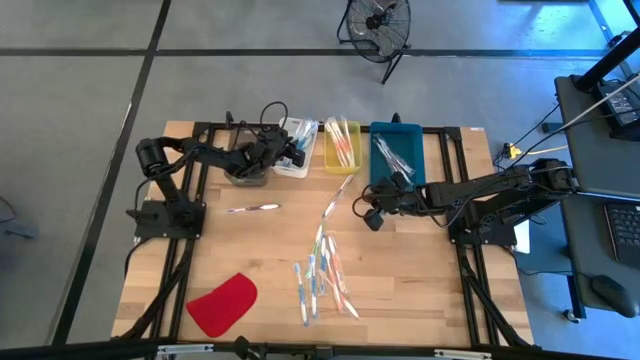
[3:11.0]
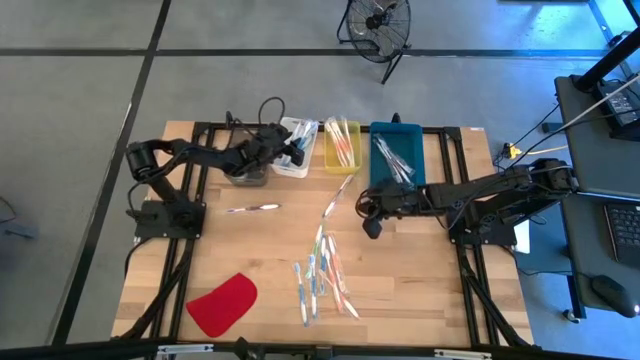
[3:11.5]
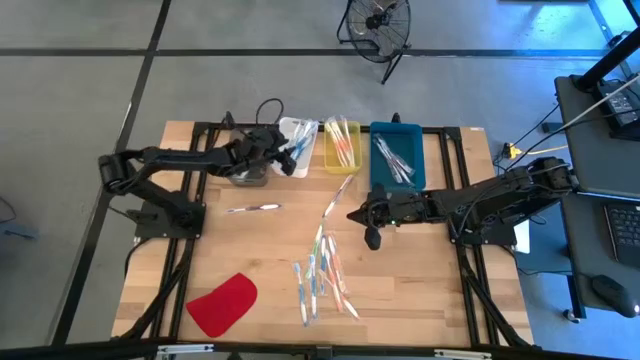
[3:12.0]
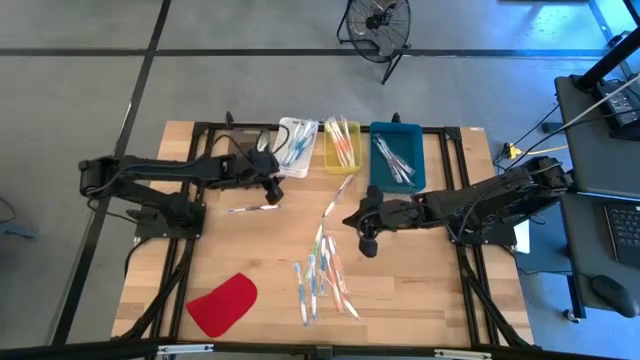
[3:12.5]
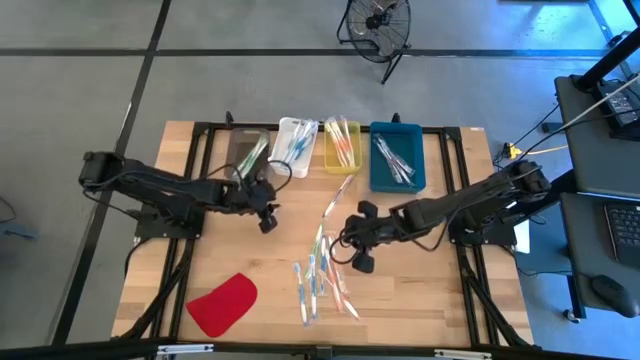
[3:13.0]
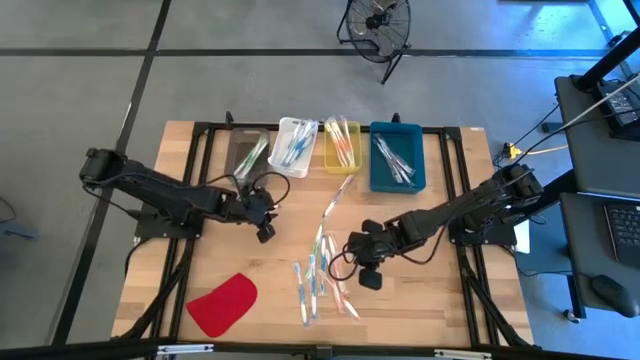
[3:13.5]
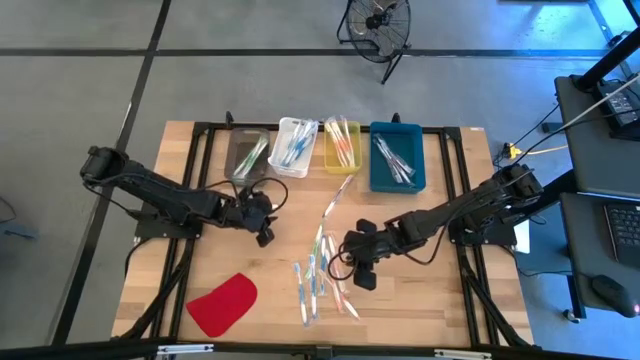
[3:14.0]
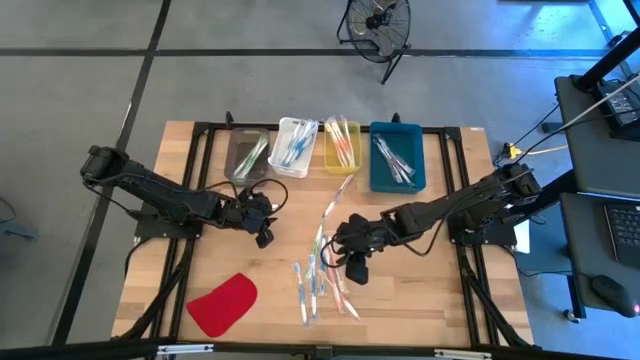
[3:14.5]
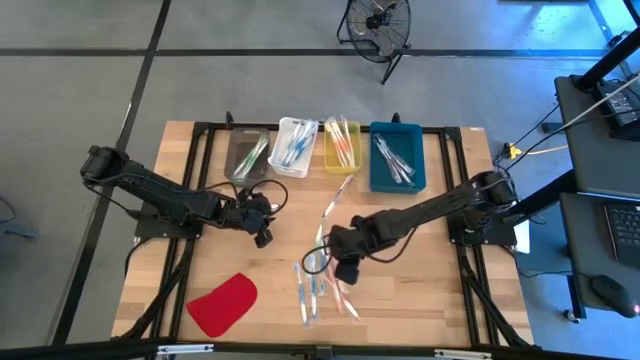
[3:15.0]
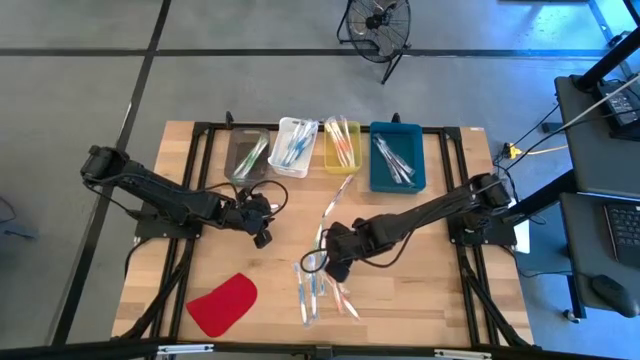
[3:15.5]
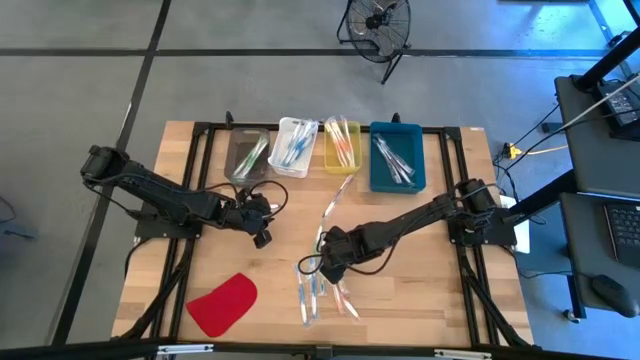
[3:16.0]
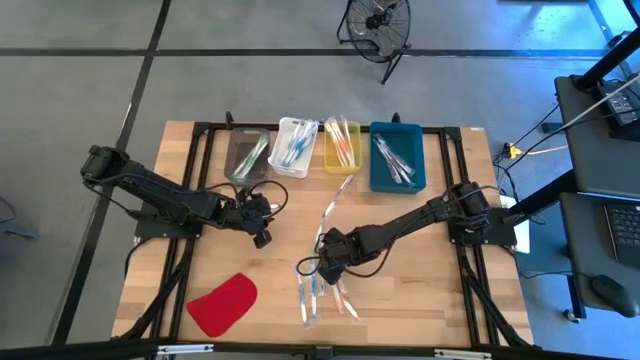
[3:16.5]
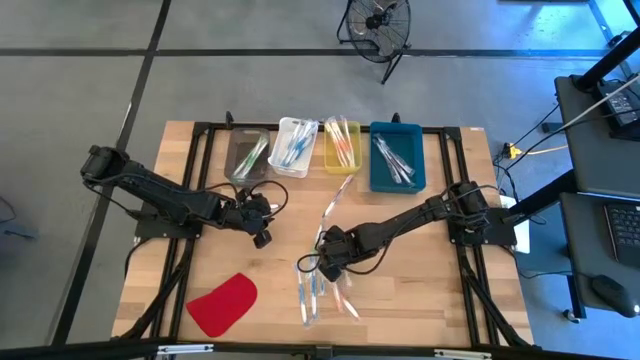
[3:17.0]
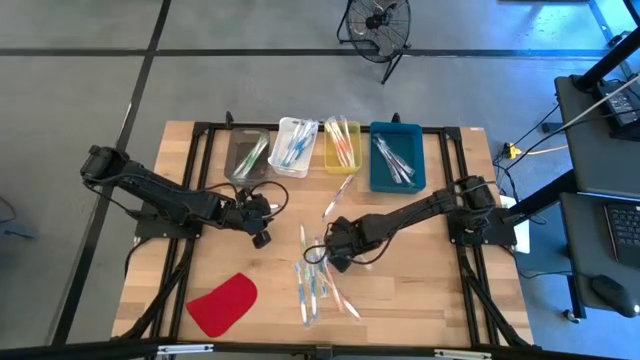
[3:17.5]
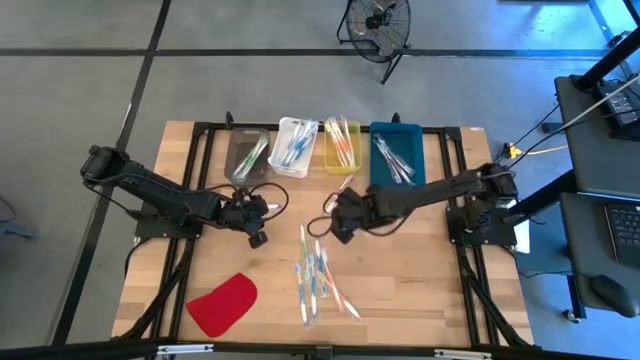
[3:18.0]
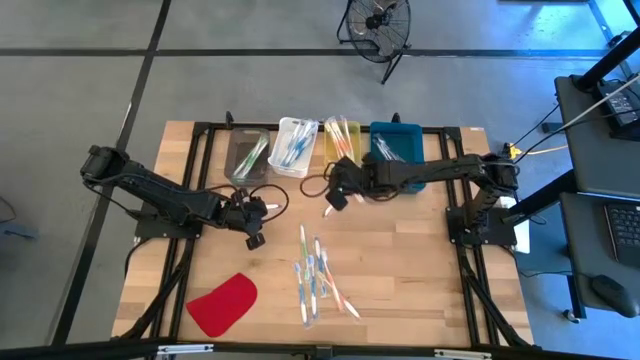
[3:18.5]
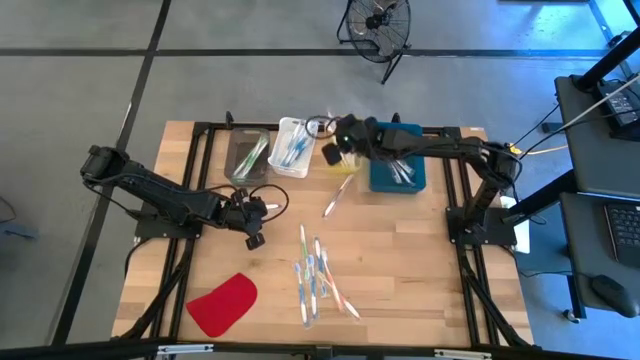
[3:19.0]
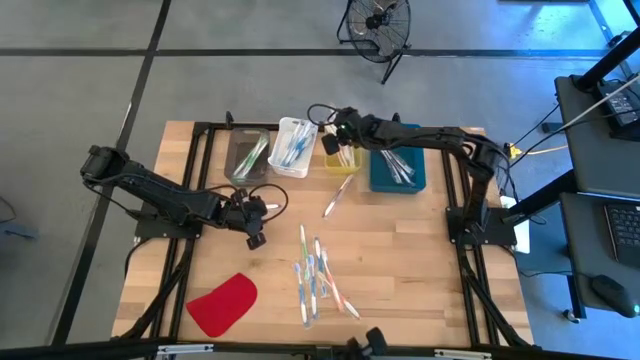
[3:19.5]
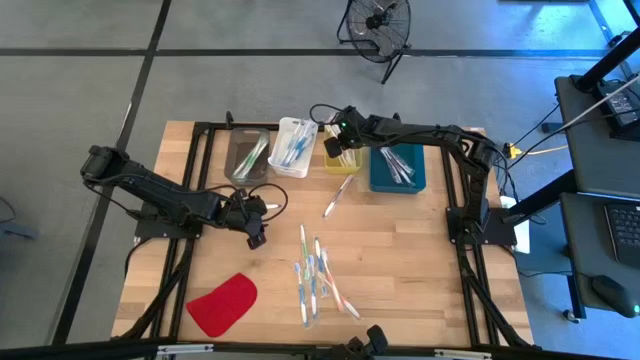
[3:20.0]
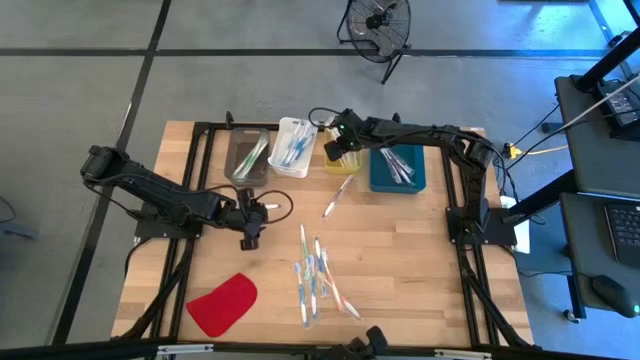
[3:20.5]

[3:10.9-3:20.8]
Task: Pick & Place Toothbrushes
Put the orange toothbrush into the yellow bin

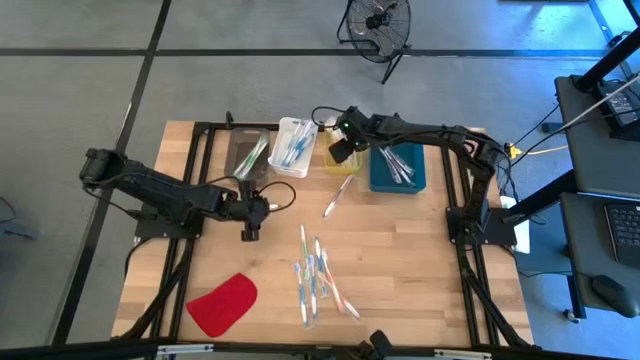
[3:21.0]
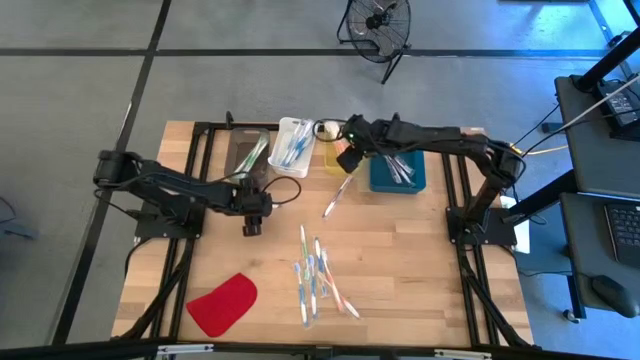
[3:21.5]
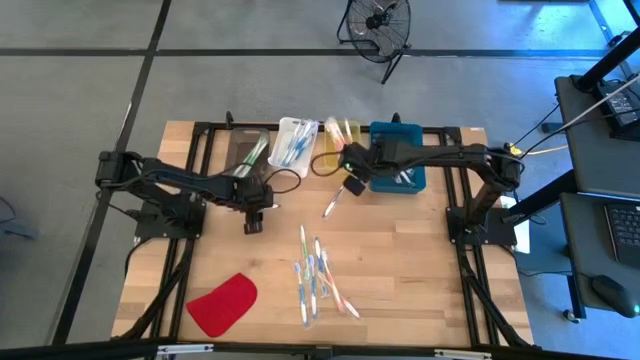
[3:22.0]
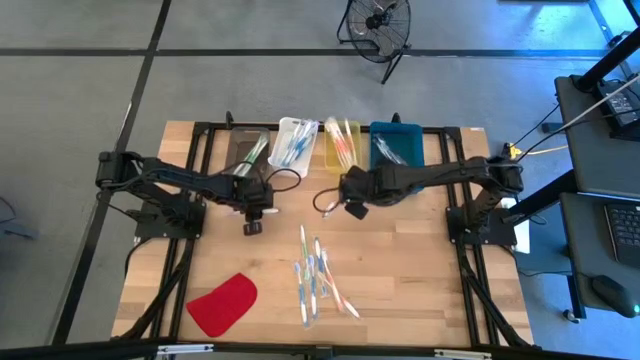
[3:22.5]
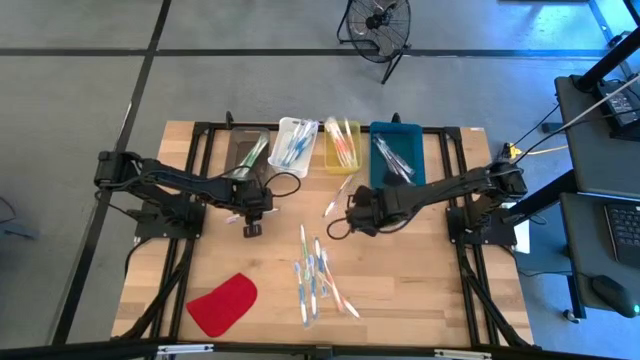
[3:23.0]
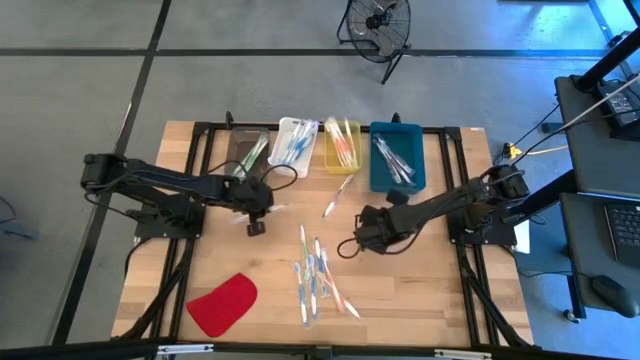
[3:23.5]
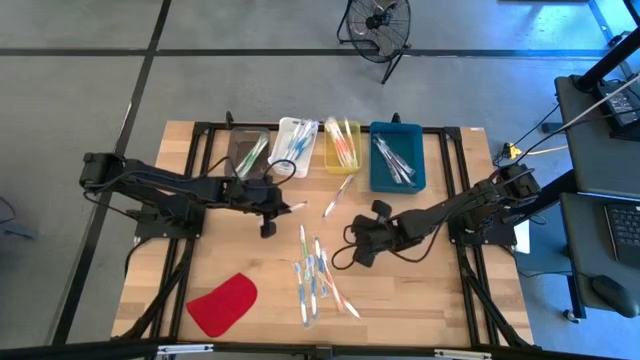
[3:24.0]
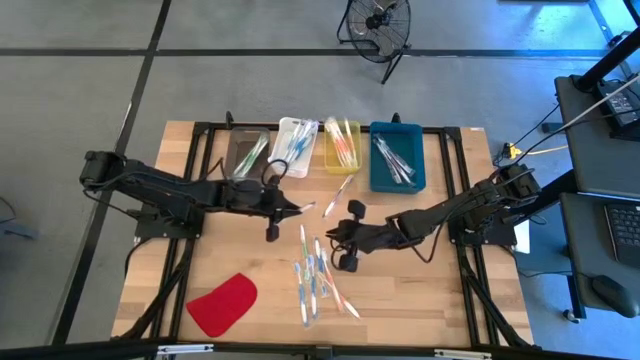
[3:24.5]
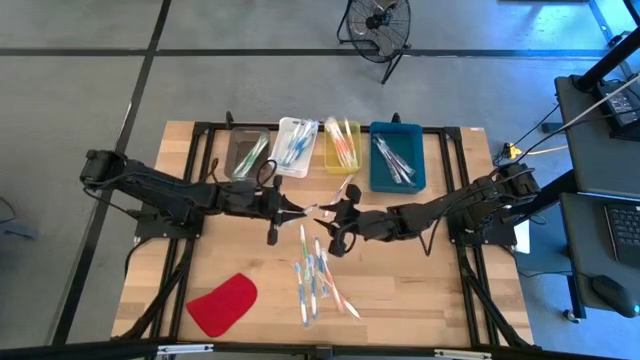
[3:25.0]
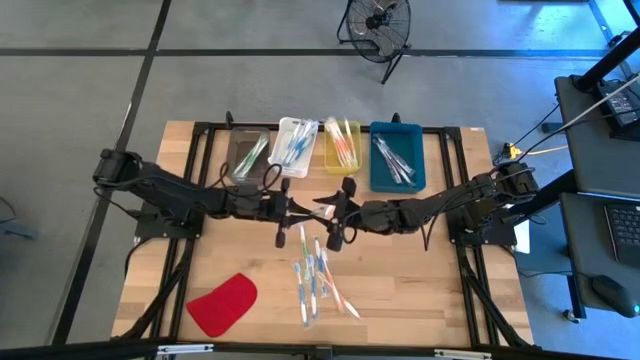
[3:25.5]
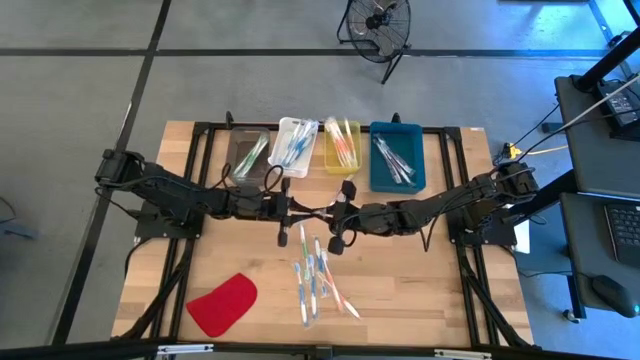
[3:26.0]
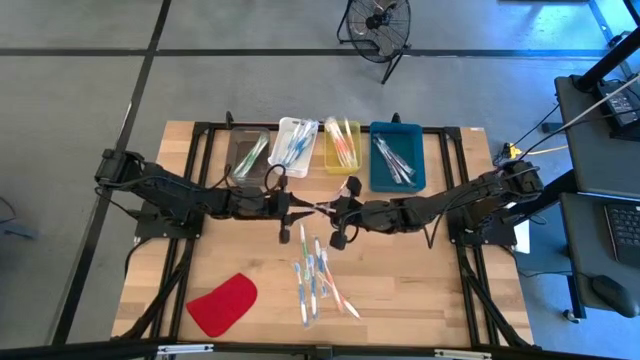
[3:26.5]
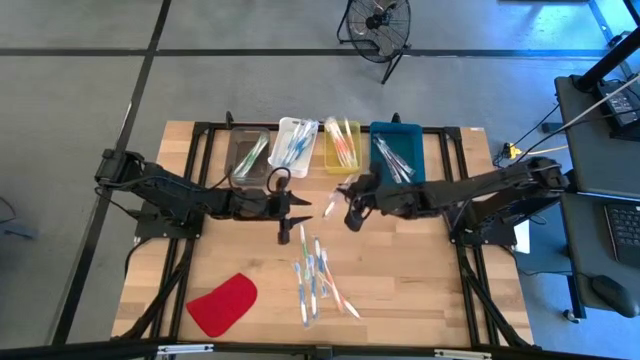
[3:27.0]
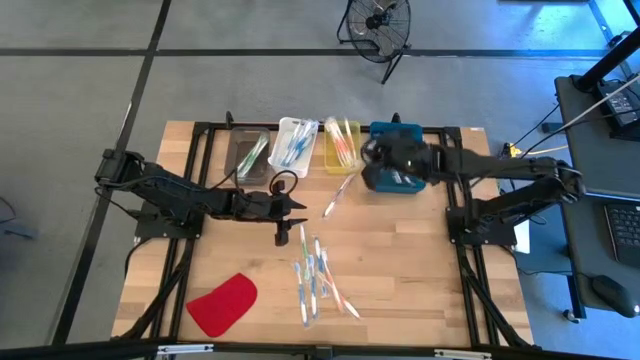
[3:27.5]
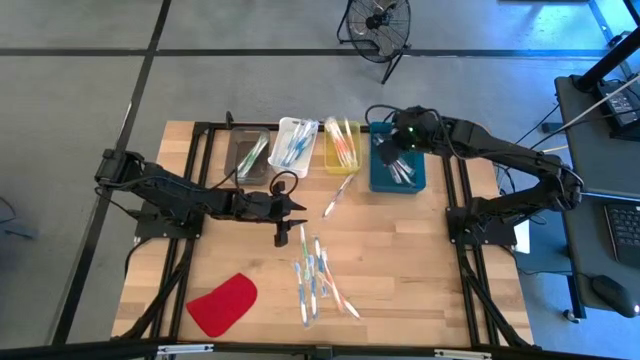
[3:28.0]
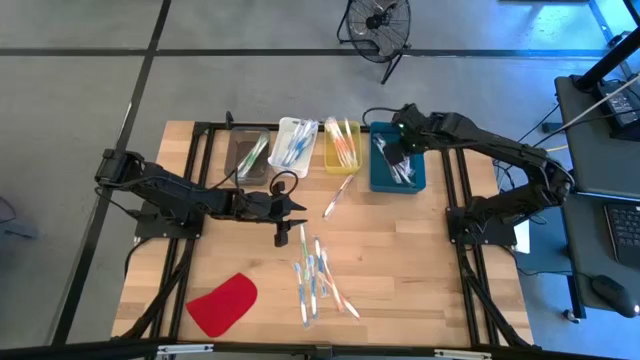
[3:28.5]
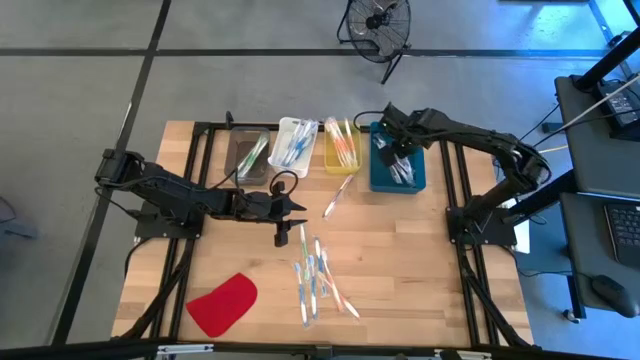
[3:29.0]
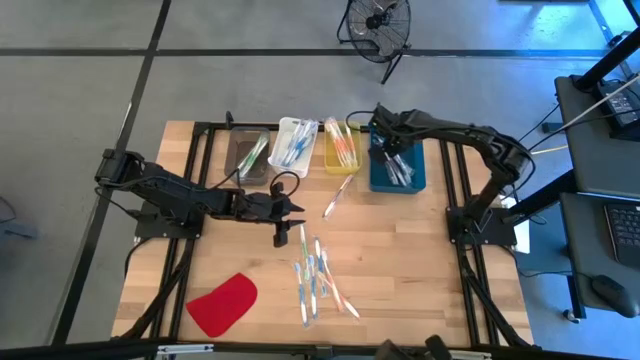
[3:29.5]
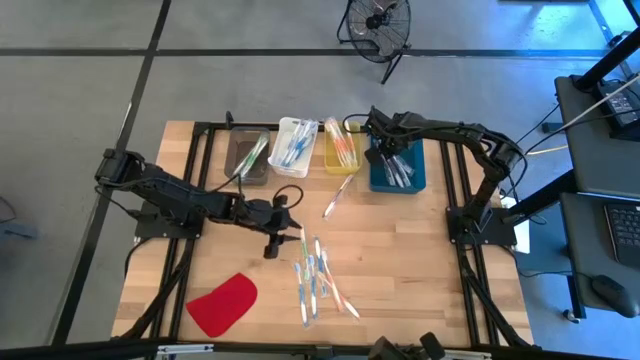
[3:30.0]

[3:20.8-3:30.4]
Put the violet toothbrush into the blue bin

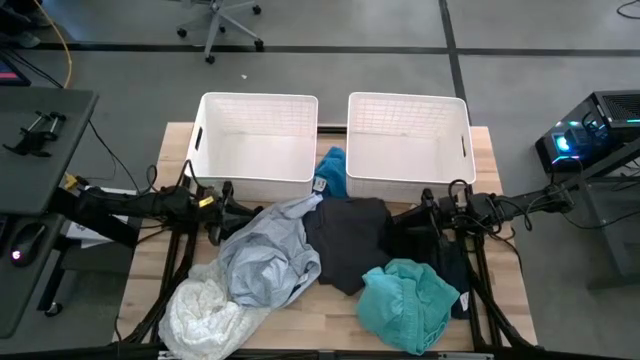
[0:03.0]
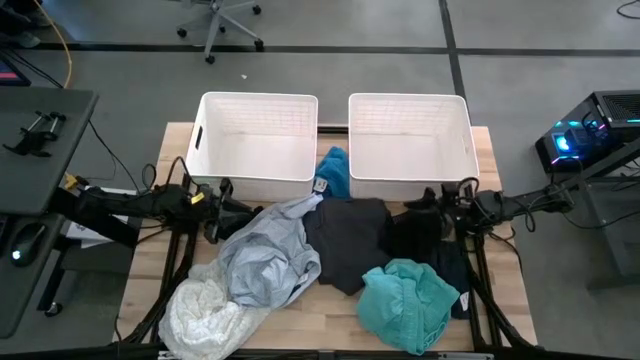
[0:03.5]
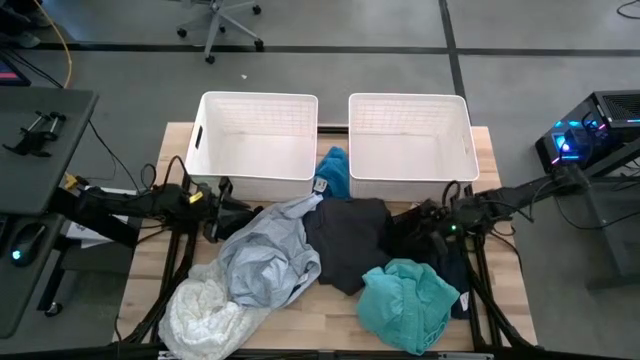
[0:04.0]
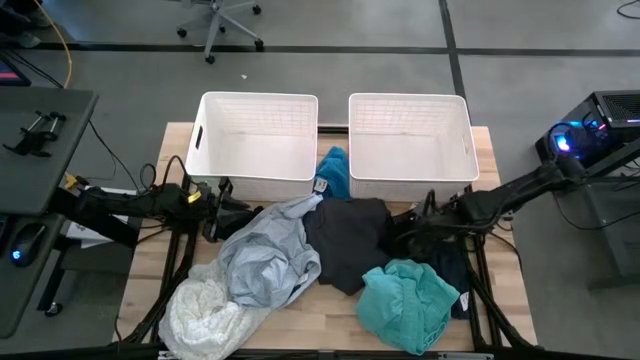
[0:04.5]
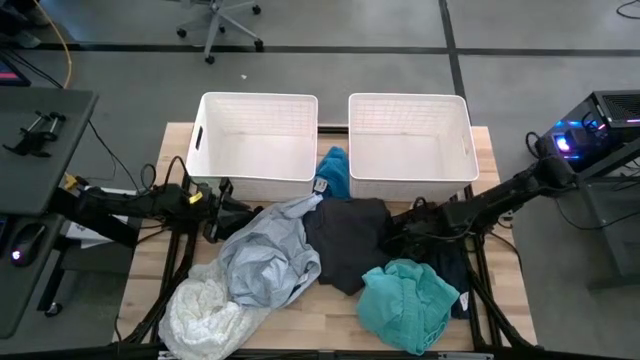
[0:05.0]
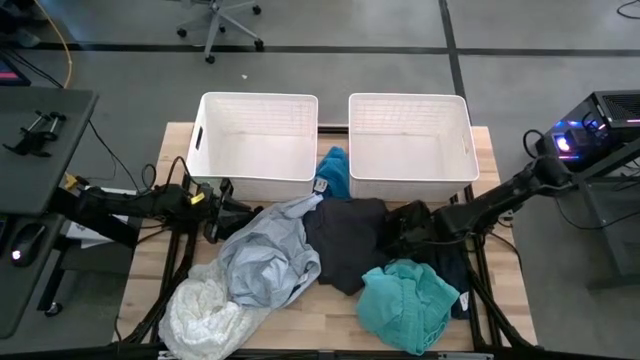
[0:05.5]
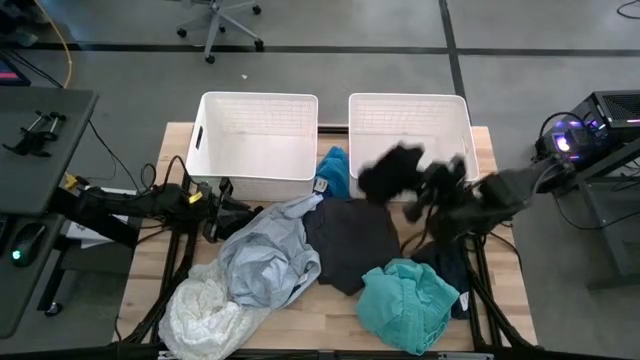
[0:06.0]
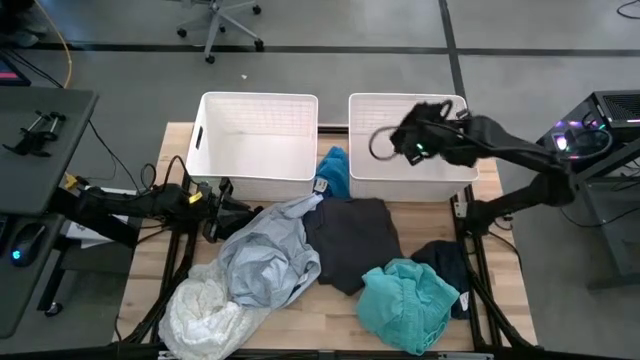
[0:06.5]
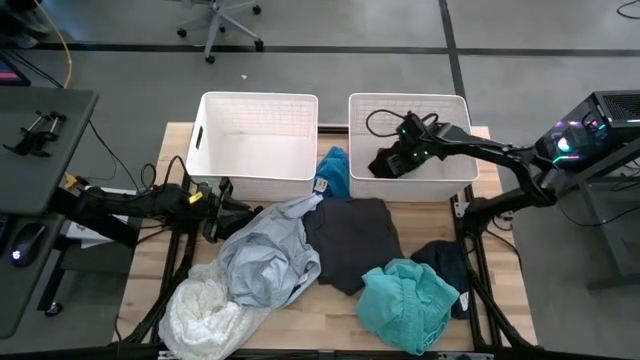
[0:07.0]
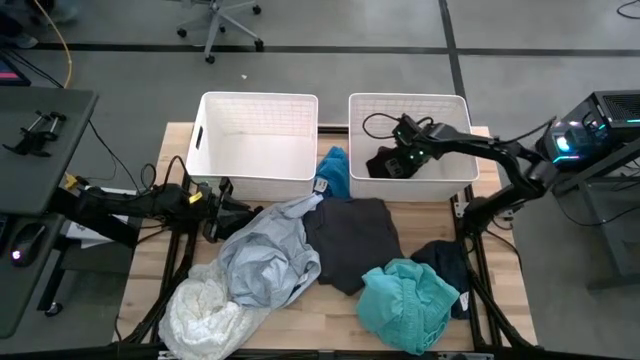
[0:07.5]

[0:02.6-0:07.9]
Task: Sort clothes
Put the right black underwear into the right white bin
